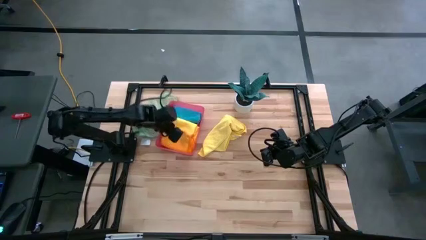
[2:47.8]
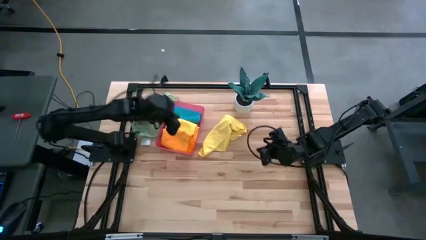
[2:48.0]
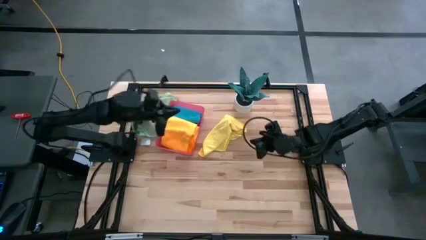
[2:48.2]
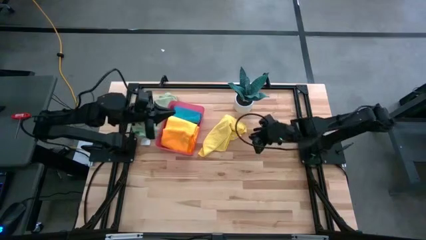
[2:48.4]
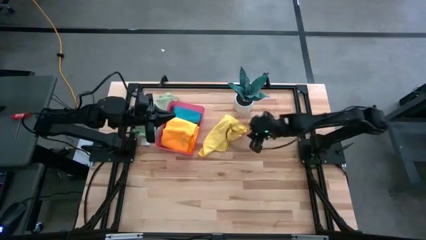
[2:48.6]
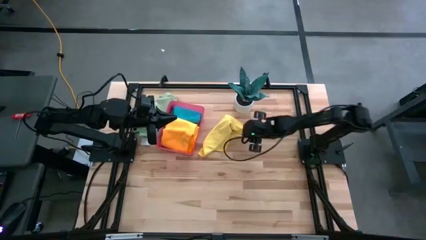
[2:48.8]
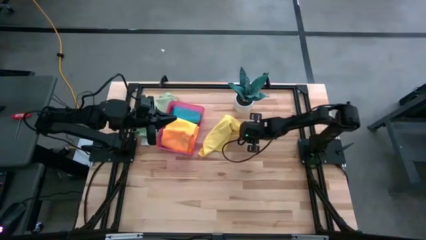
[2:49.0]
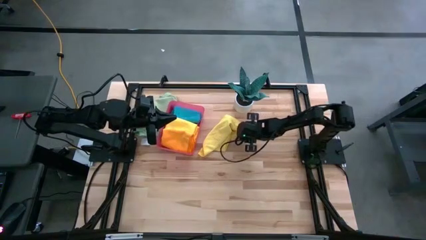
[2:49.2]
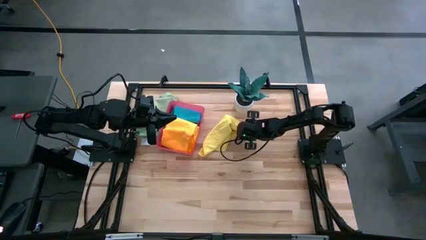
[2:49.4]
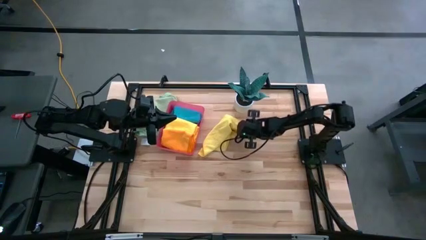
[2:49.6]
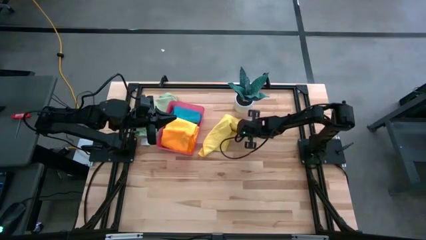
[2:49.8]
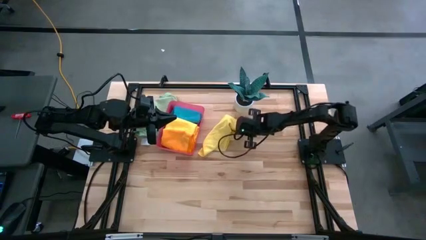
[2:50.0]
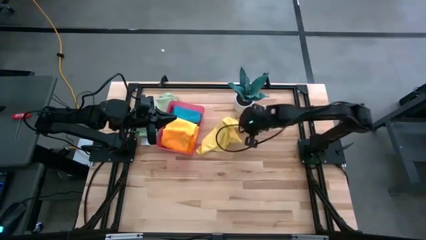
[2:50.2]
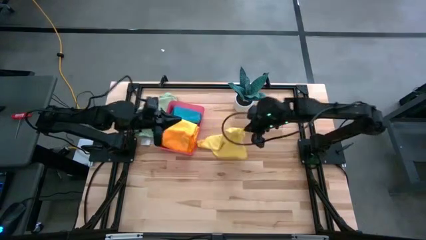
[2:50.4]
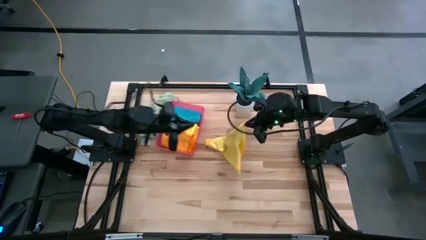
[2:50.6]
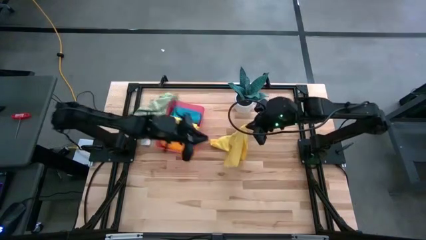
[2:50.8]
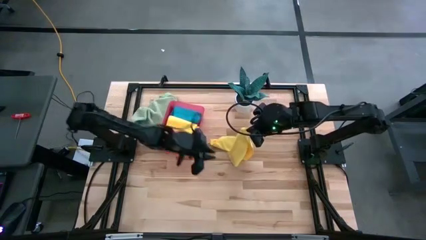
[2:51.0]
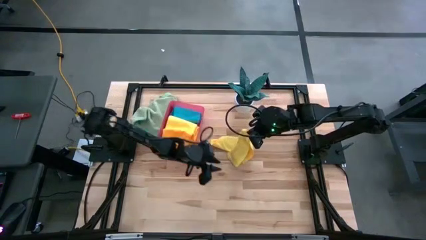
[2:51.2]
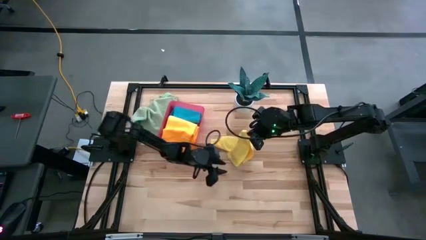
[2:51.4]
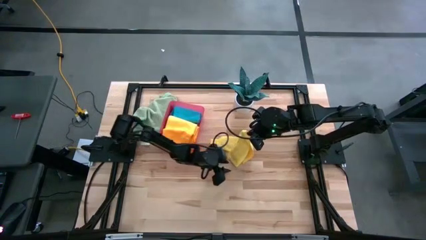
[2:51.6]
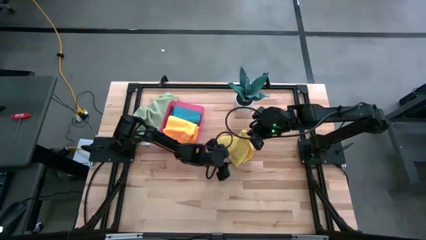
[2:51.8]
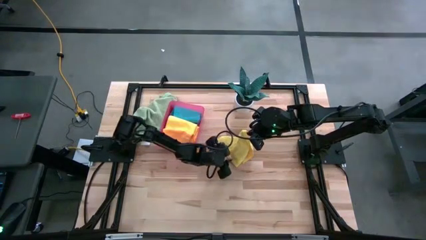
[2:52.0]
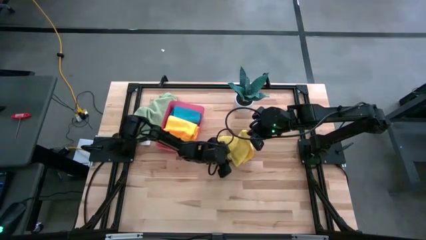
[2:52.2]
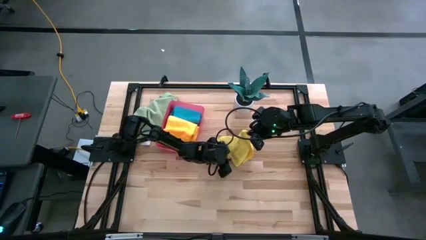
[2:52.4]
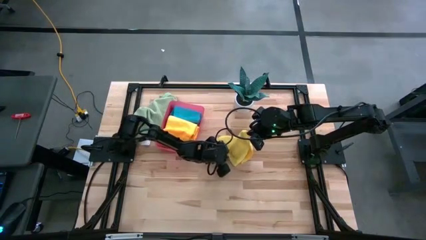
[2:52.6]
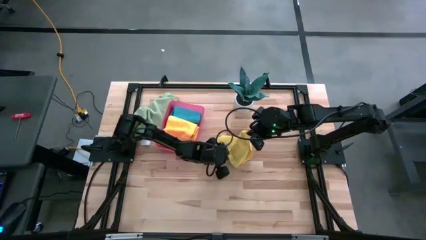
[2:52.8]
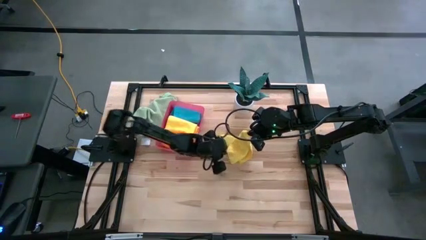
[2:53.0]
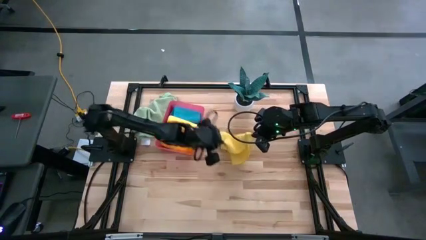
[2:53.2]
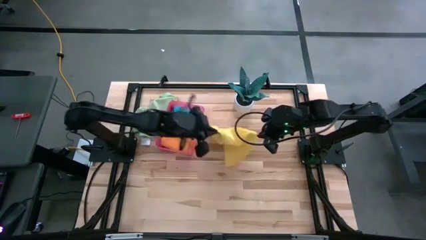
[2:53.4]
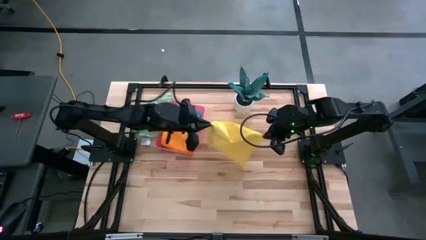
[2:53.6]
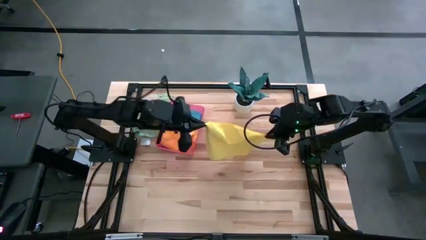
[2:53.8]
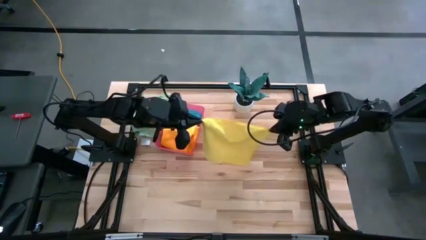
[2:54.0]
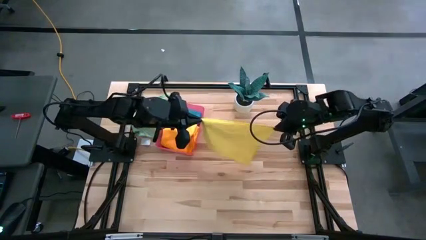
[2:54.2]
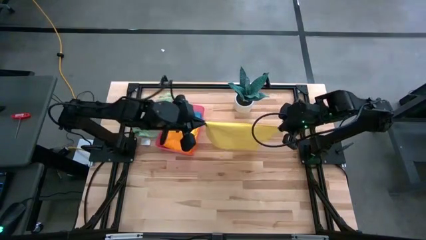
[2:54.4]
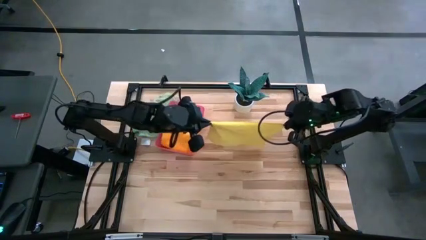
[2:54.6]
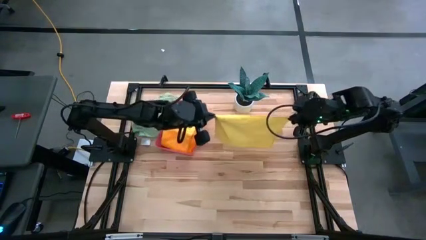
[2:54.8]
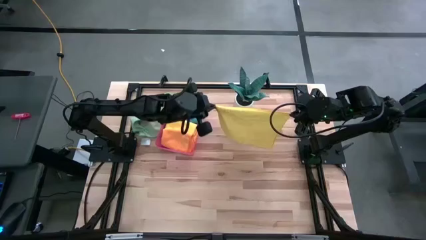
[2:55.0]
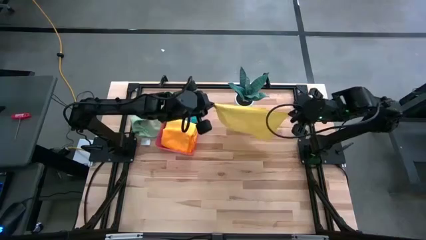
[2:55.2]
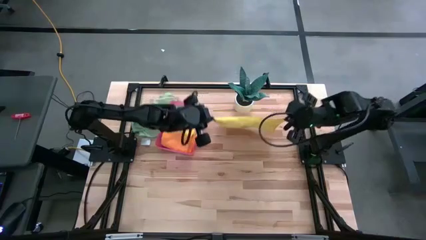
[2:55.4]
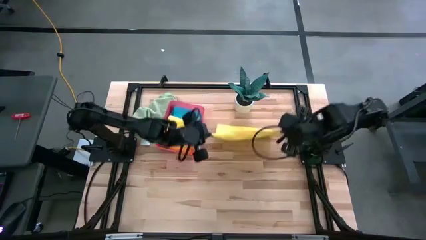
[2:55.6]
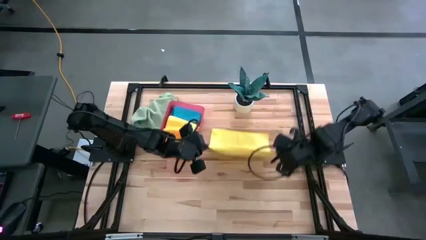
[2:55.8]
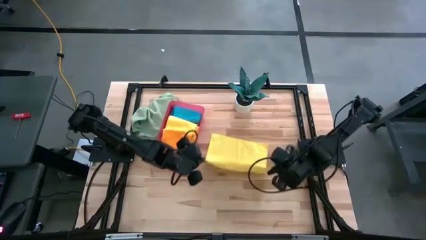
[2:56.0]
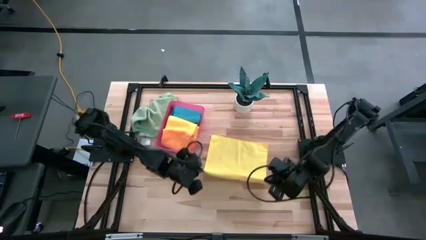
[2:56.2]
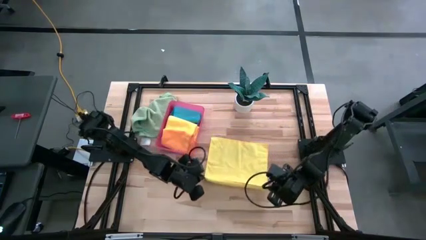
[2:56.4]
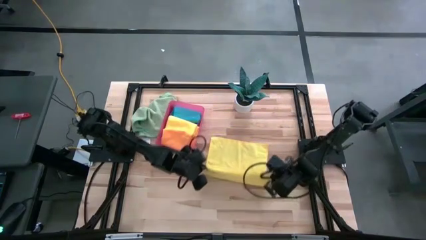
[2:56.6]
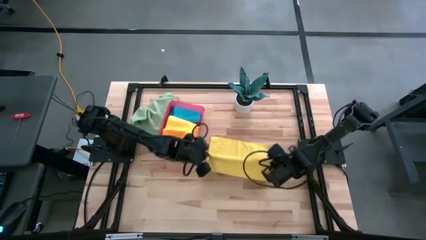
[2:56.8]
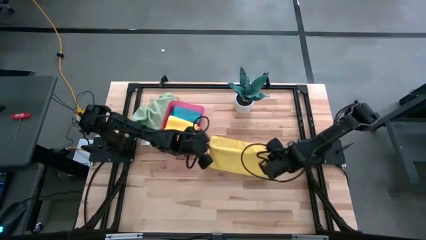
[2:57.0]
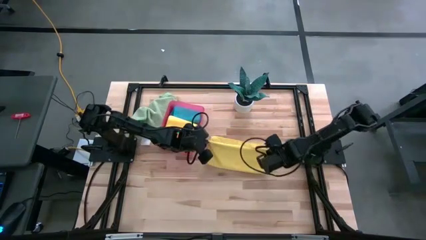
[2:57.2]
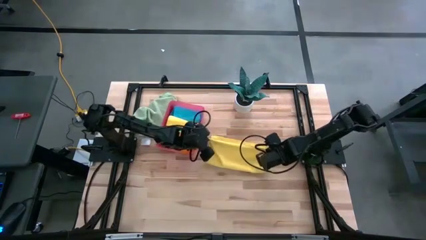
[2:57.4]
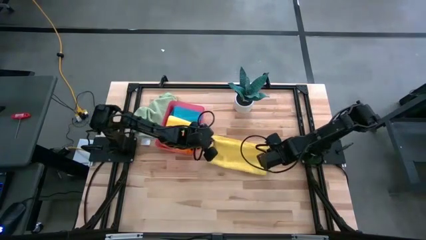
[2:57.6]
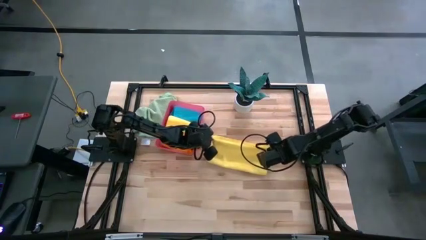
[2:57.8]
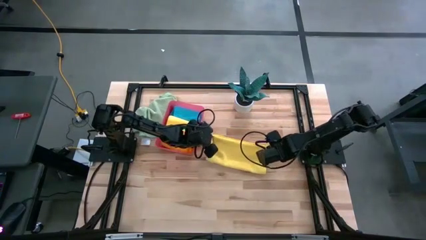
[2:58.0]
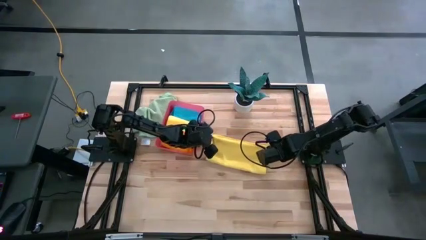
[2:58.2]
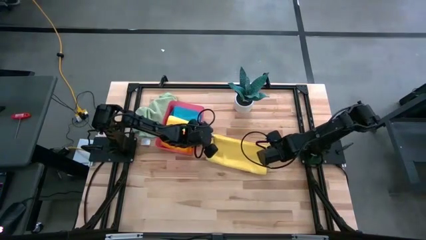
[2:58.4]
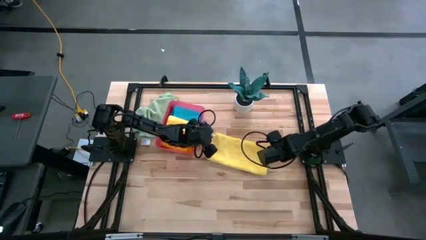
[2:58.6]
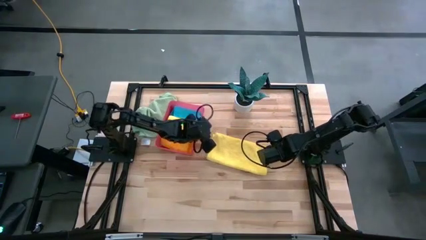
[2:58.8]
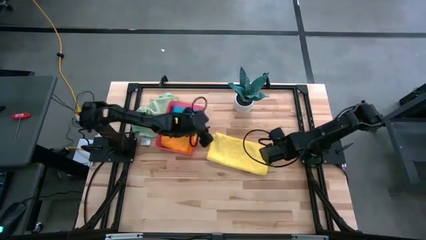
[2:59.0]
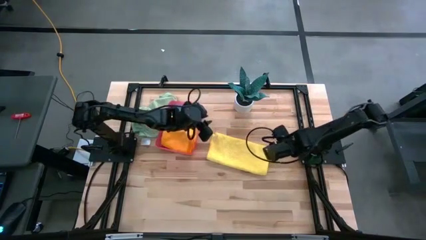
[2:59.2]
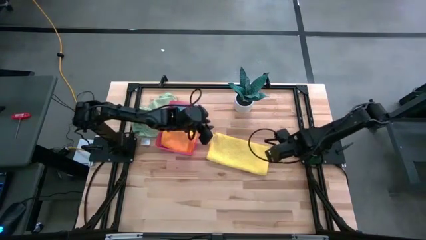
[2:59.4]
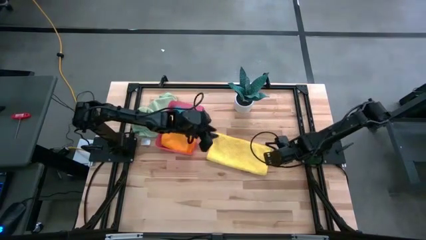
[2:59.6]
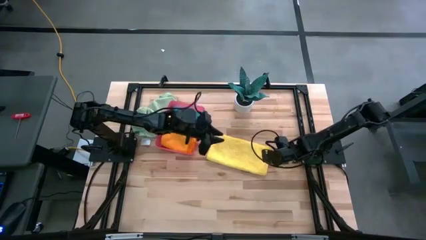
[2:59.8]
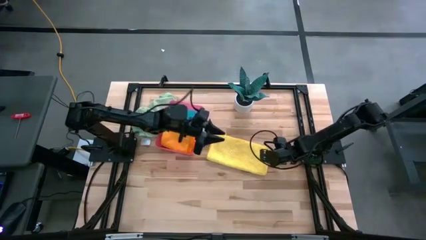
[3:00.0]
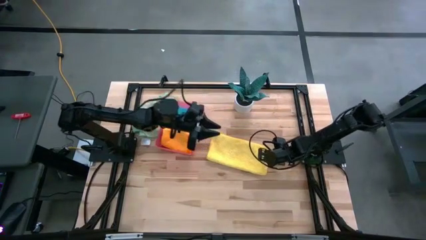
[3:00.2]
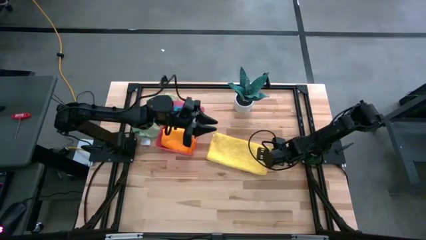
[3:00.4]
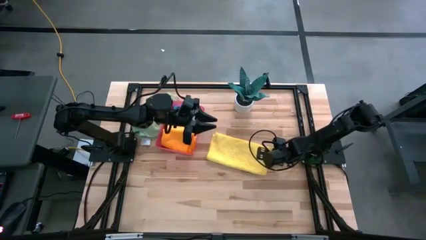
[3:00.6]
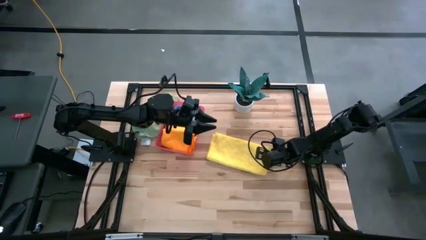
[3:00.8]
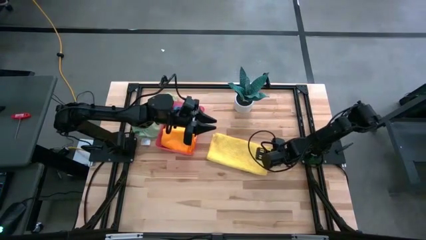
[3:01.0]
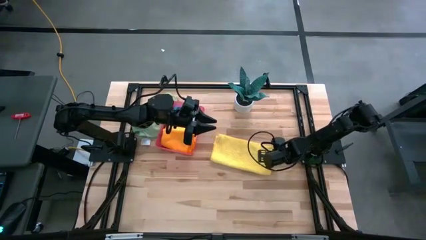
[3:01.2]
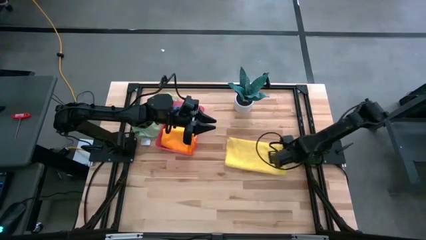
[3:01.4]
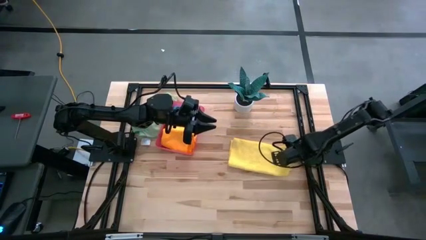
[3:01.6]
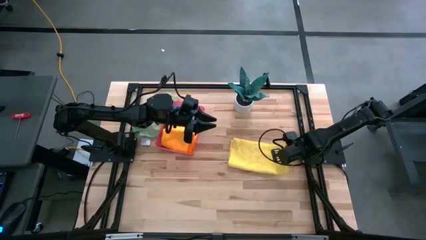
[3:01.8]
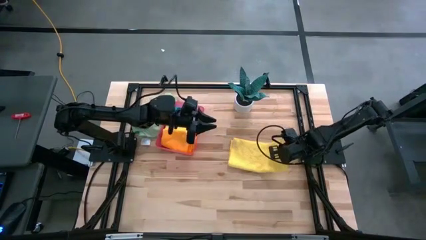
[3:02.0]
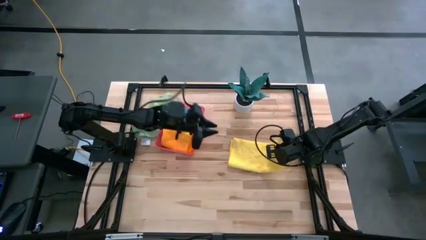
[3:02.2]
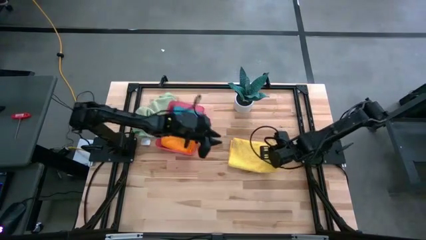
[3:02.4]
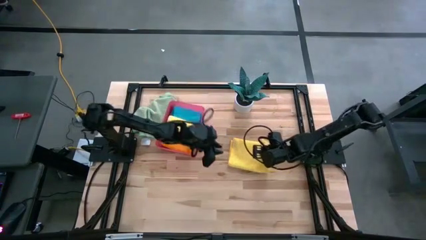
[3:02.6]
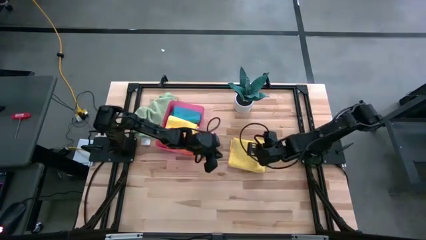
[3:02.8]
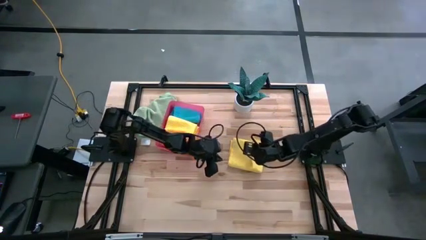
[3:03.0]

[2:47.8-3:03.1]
Task: Fold microfiber towels
Fold the yellow microfiber cloth

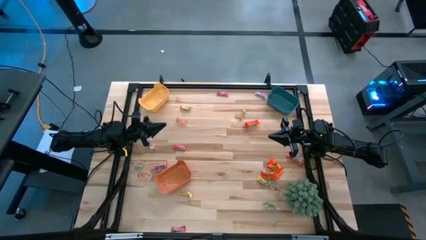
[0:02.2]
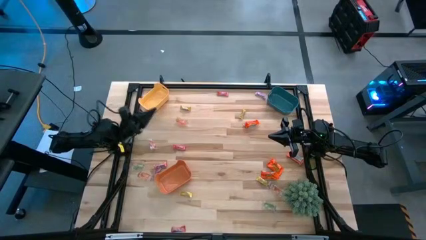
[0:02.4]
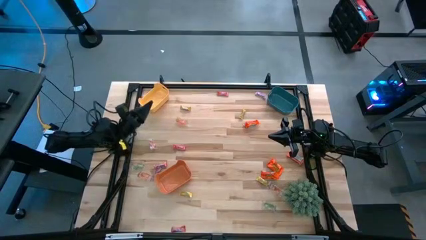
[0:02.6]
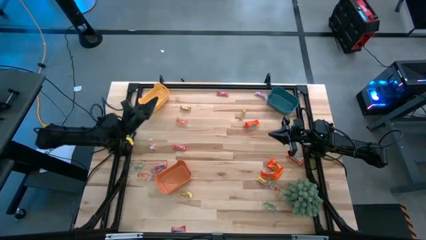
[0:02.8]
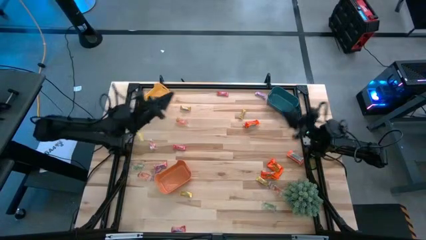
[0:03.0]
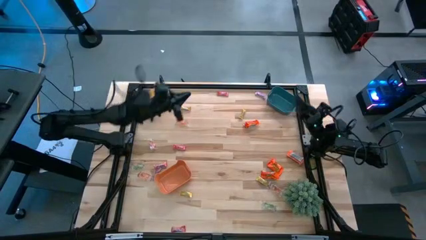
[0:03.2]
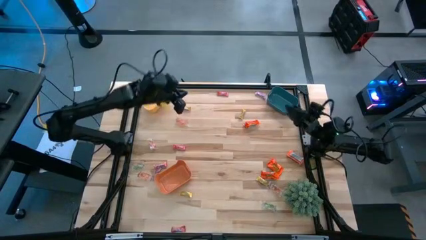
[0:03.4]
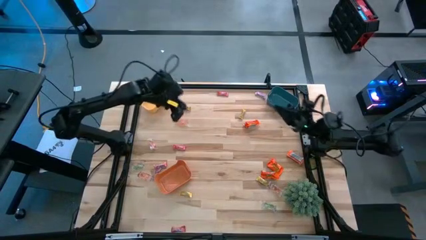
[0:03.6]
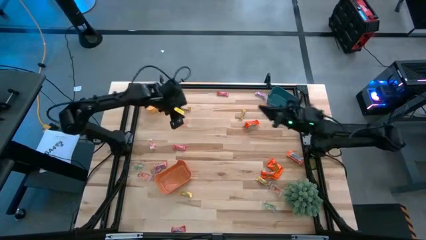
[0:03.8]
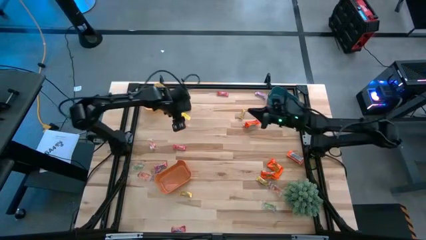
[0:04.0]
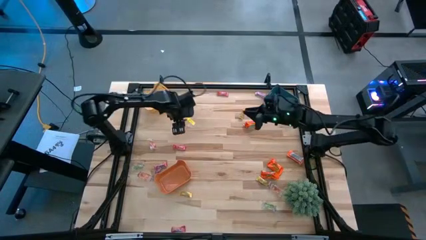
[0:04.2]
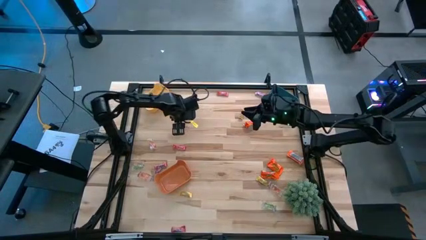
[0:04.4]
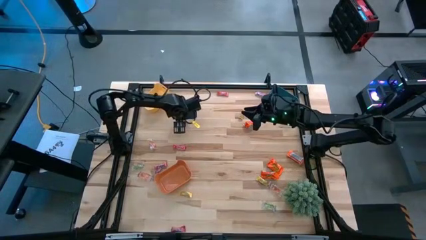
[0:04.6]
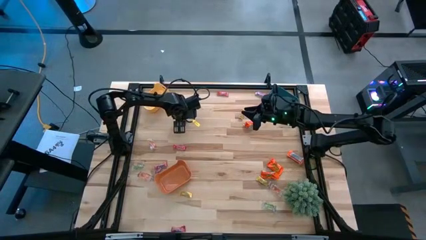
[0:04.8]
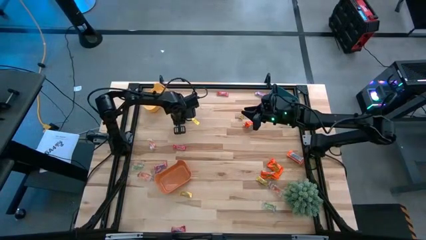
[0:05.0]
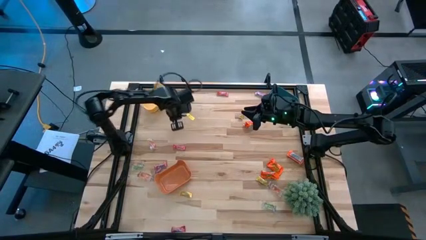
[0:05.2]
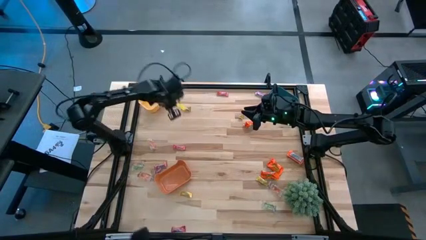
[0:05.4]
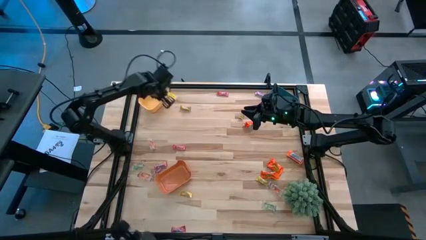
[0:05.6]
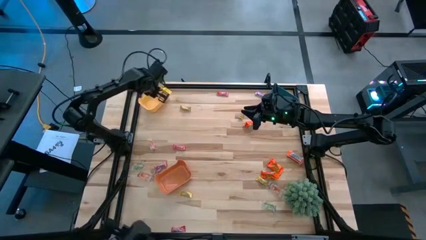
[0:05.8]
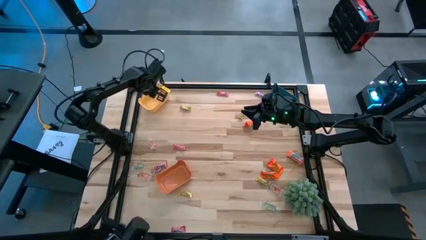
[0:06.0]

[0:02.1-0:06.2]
Task: Sort candy
Put the top left orange gummy into the yellow bin
